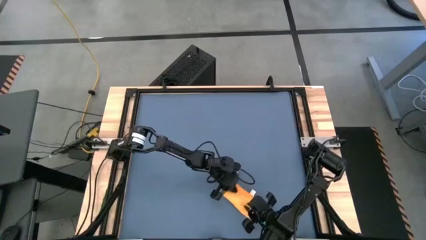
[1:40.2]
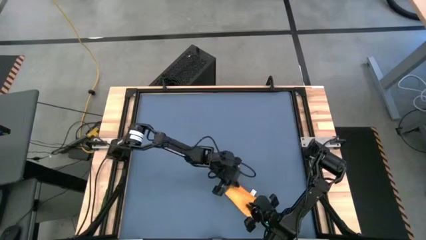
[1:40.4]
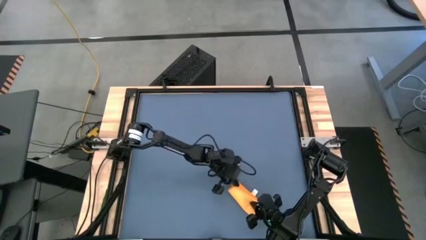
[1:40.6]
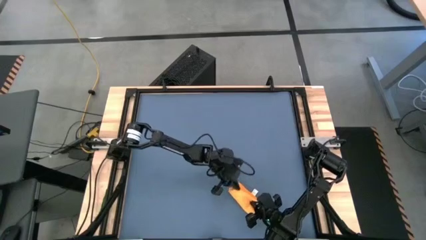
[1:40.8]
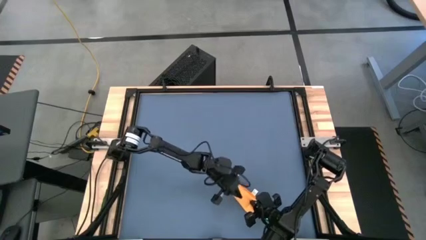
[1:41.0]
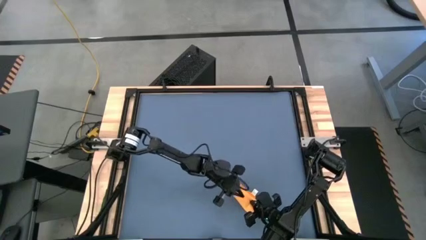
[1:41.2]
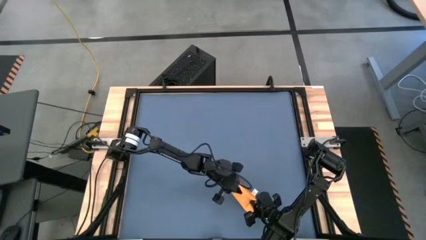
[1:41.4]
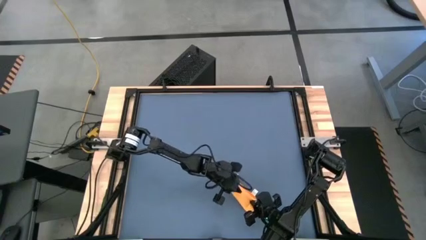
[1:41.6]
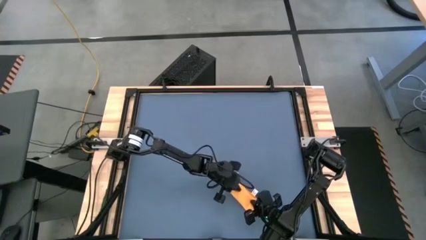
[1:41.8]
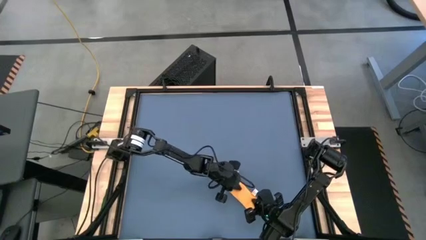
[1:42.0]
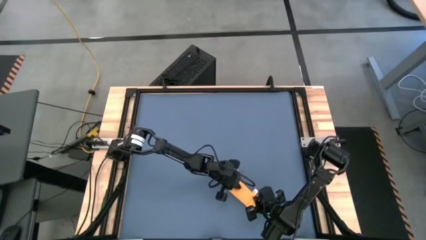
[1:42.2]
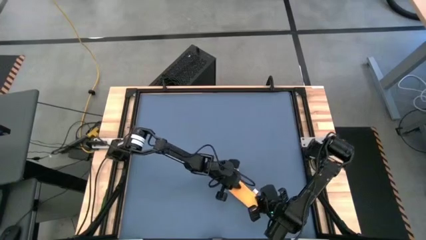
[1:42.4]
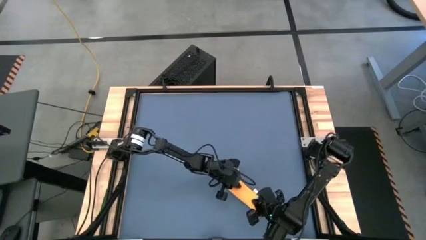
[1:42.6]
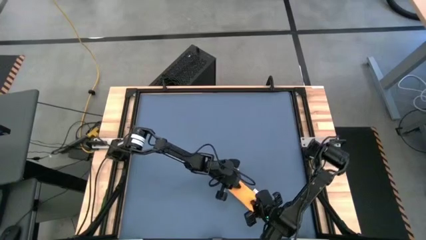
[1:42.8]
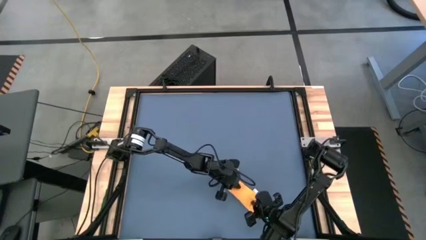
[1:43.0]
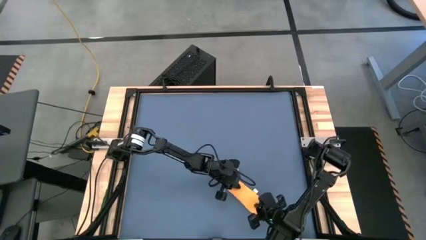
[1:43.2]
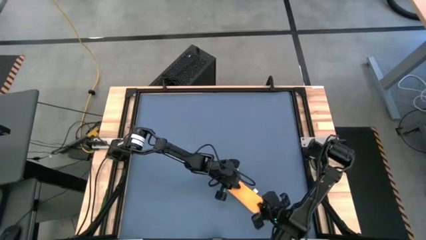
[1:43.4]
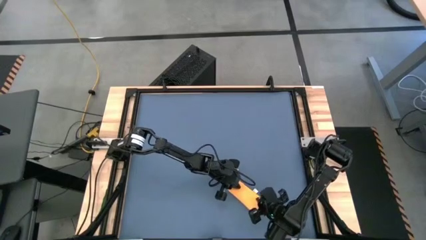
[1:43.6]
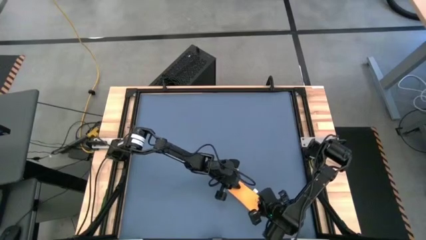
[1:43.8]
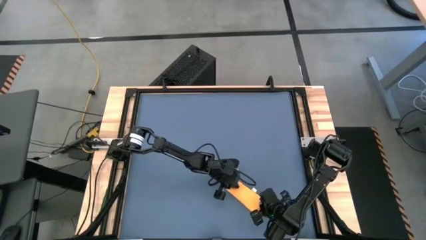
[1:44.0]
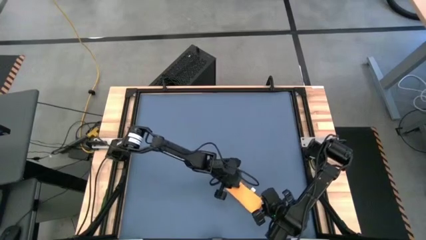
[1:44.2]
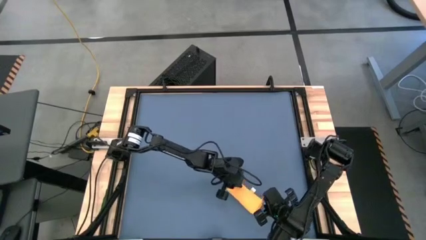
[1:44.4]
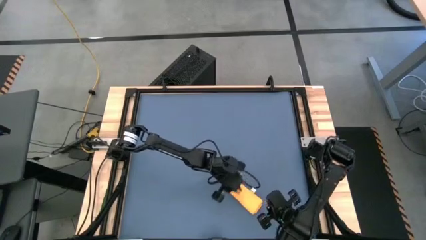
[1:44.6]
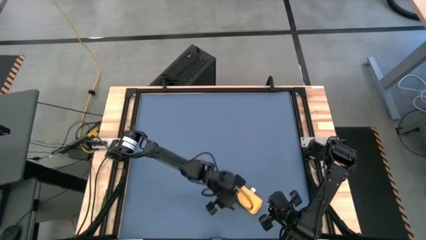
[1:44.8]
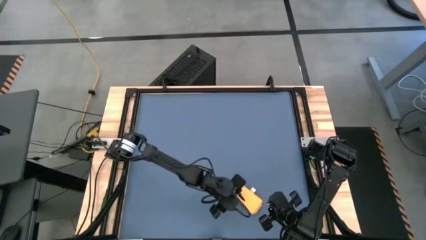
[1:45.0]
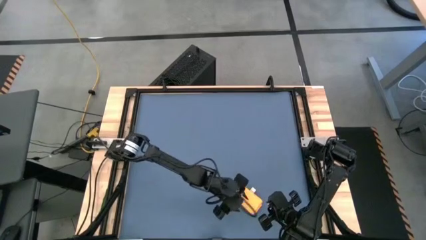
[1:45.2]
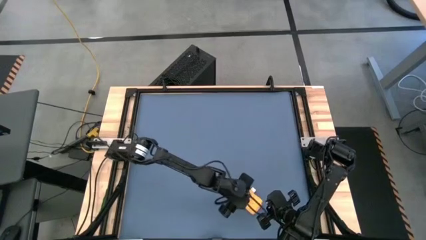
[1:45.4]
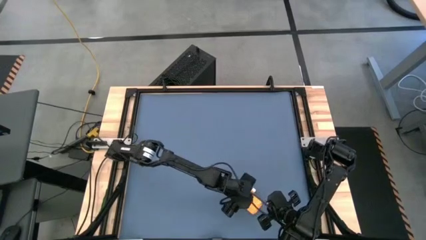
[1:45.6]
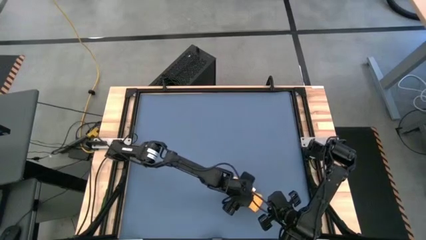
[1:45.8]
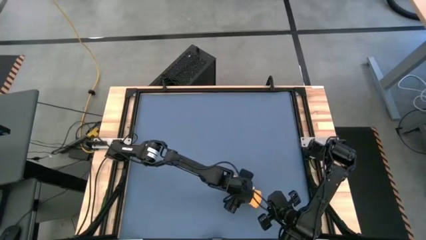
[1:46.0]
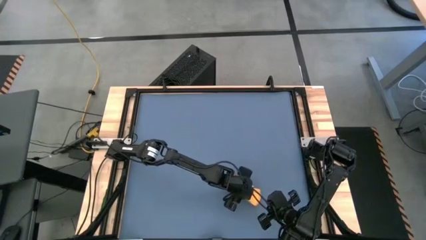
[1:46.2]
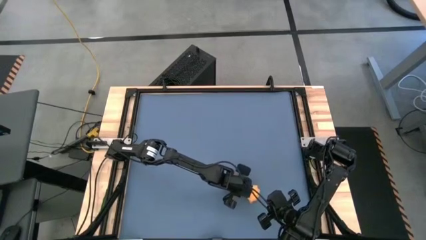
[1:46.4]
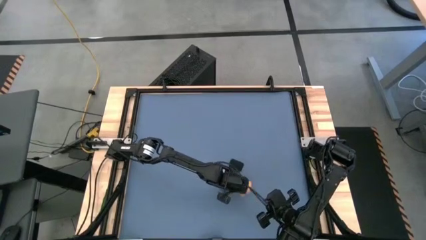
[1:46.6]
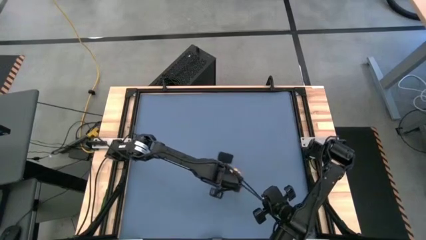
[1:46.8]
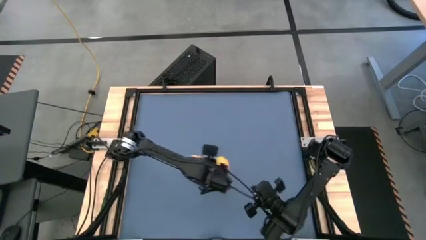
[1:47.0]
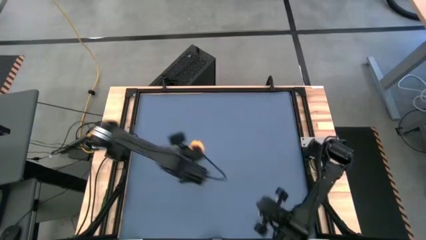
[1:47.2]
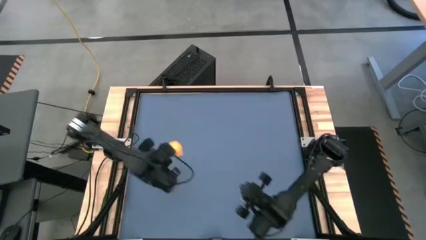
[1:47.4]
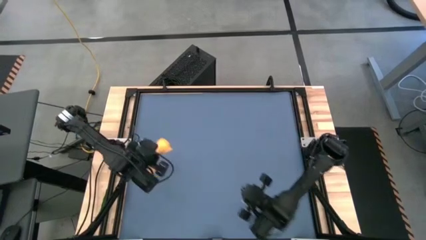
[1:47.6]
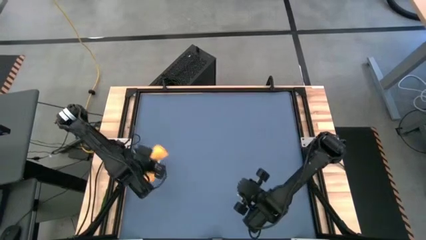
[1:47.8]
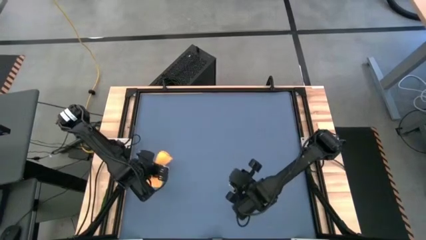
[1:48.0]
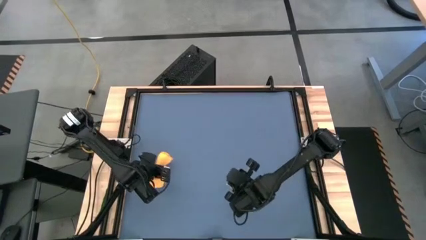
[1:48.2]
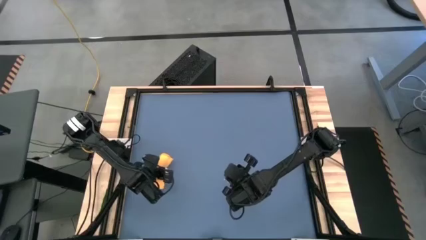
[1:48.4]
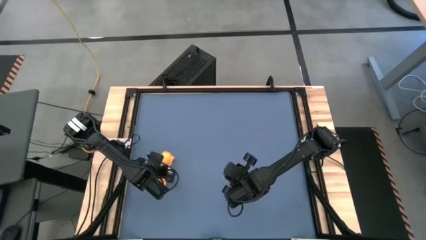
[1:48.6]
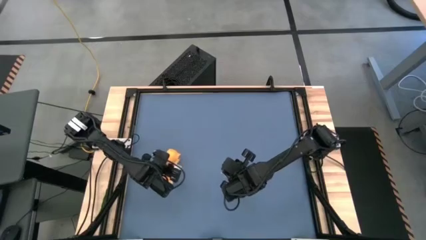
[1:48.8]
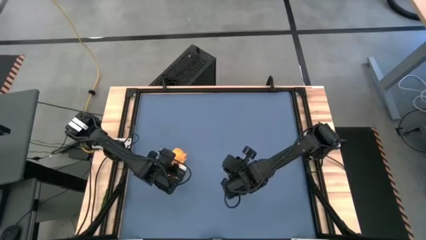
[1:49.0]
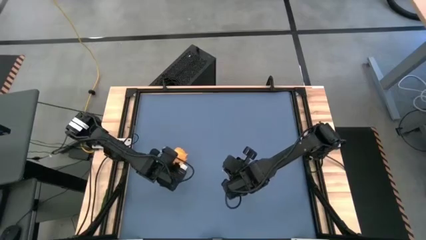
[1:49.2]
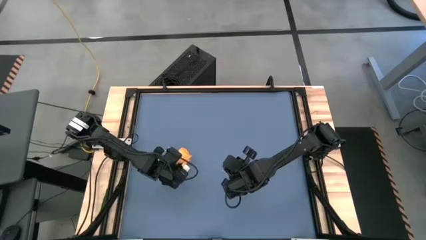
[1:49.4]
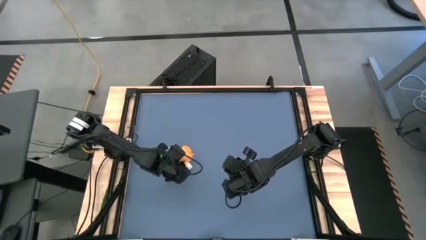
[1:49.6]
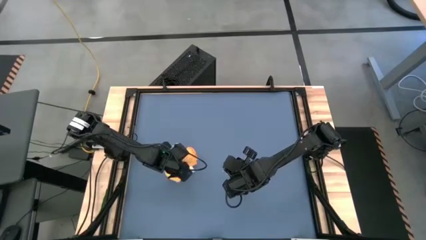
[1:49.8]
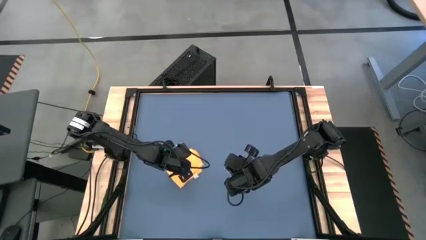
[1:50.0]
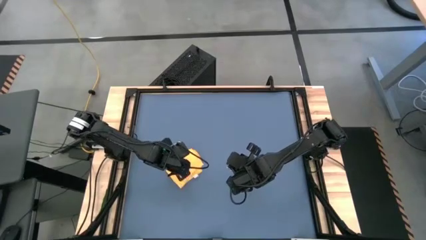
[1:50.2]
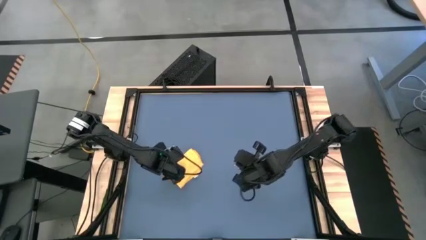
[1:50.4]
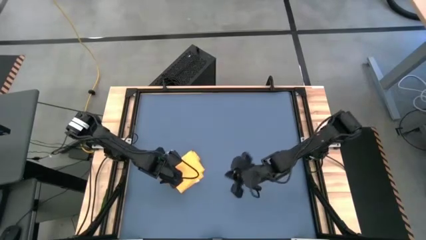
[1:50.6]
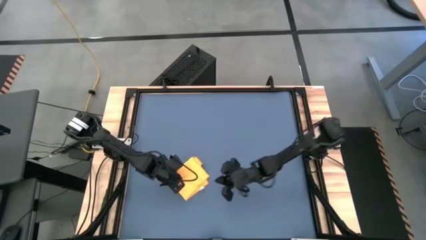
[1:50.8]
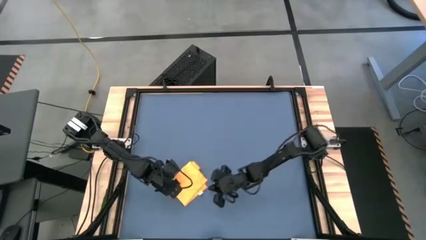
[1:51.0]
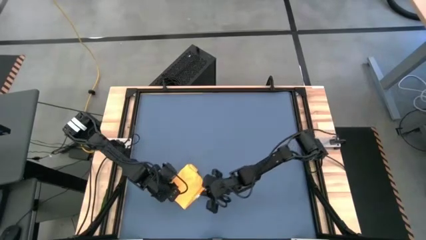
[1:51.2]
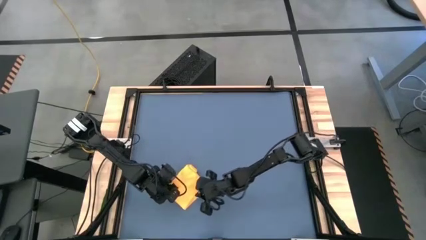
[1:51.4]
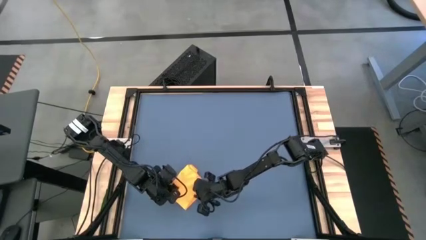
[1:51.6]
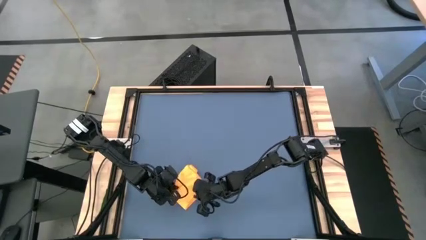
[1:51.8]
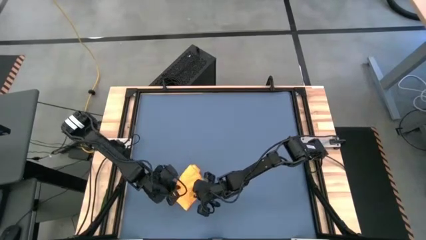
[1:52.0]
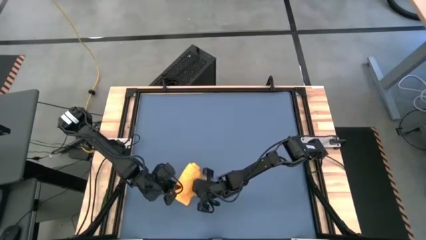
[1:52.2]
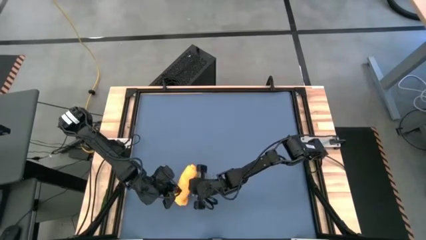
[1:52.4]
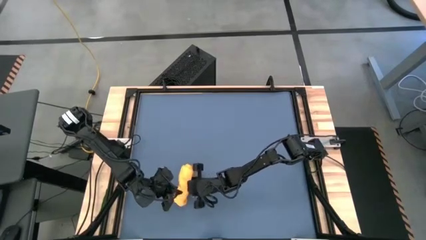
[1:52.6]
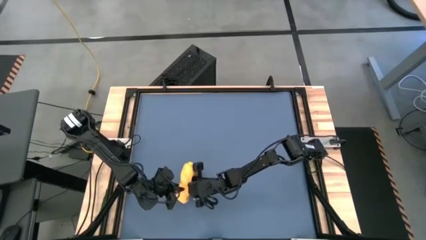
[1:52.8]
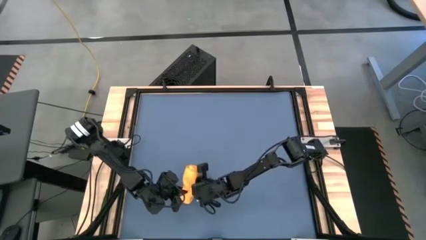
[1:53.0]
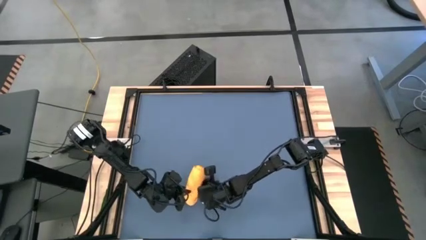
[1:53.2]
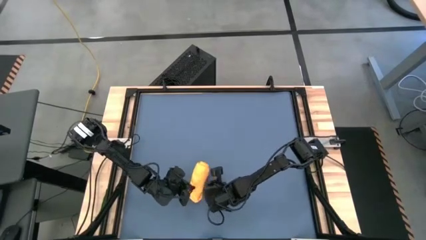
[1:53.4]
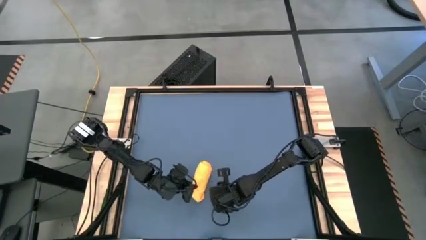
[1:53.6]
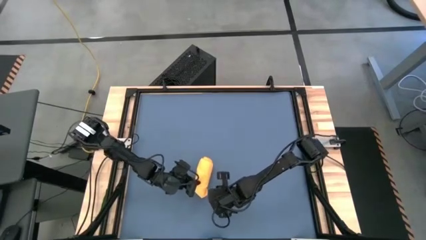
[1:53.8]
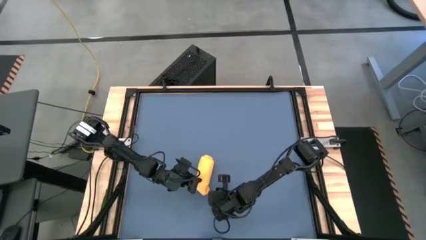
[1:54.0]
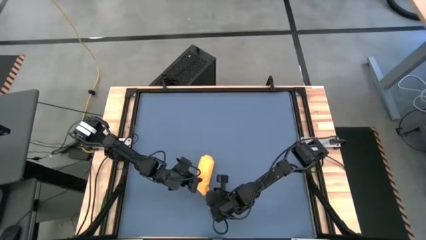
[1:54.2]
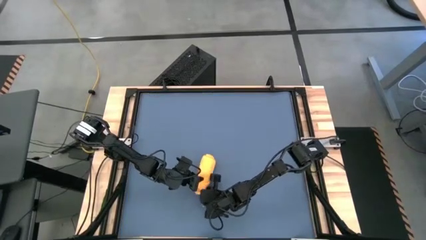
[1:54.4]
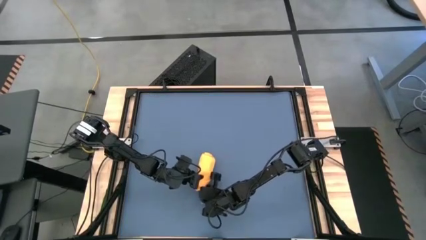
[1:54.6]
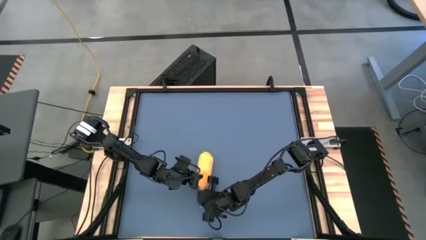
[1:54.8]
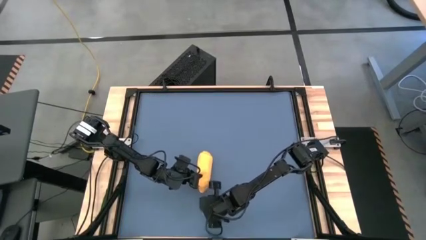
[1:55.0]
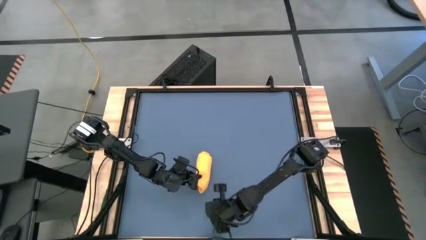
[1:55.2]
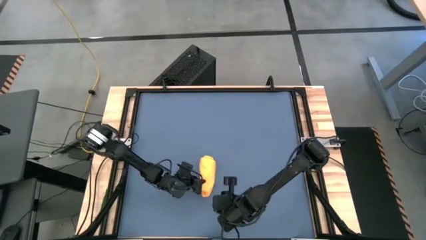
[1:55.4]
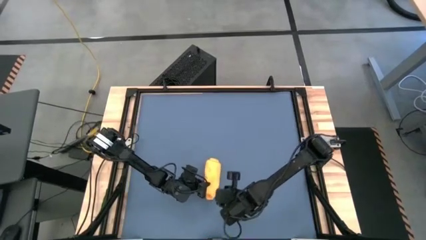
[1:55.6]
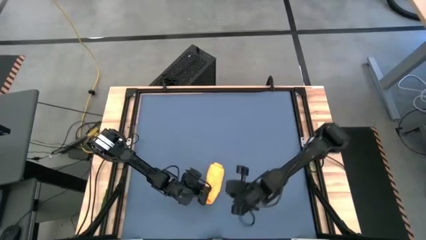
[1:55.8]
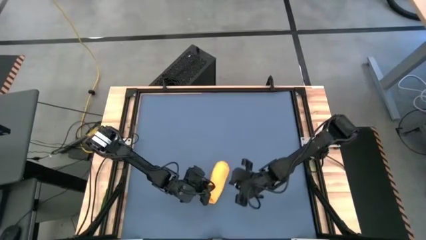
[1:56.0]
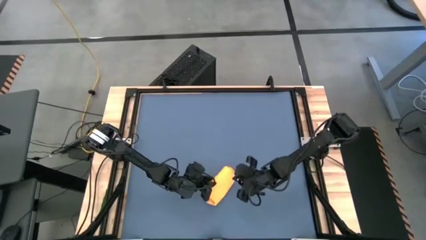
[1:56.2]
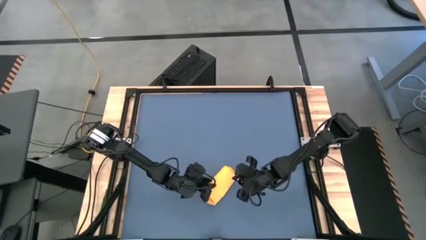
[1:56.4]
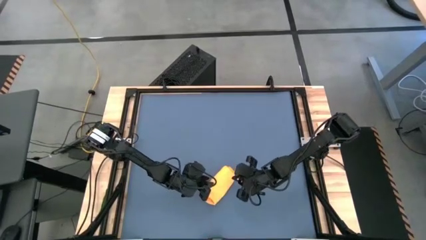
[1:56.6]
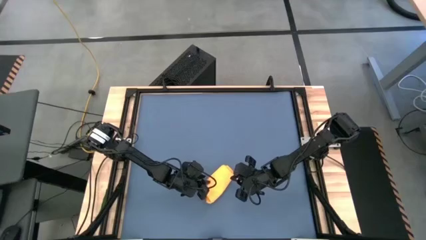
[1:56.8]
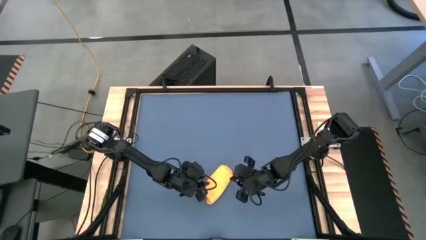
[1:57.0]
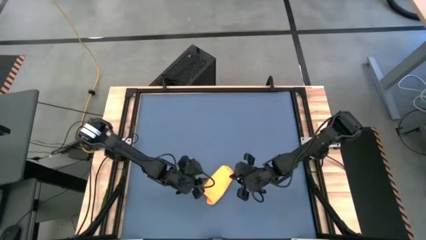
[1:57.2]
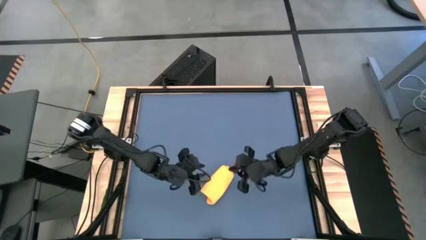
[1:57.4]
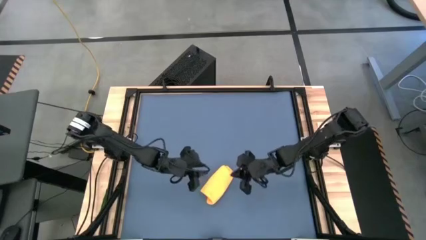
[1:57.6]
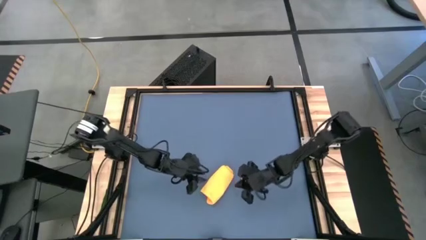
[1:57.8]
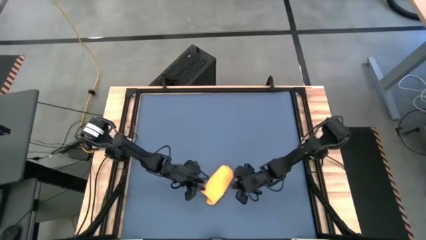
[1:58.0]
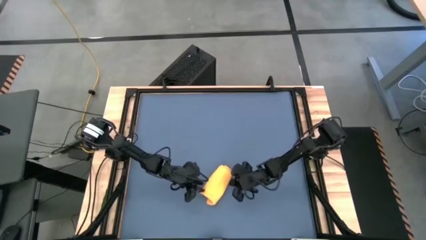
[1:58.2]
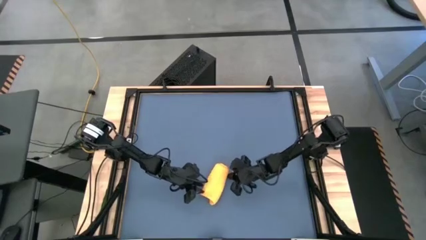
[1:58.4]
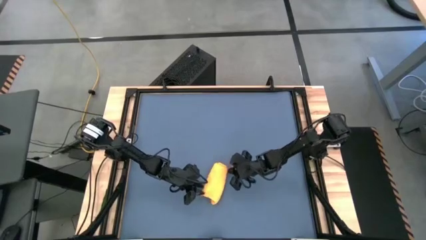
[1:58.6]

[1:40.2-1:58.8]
Task: Roll towel
Roll the orange microfiber cloth
